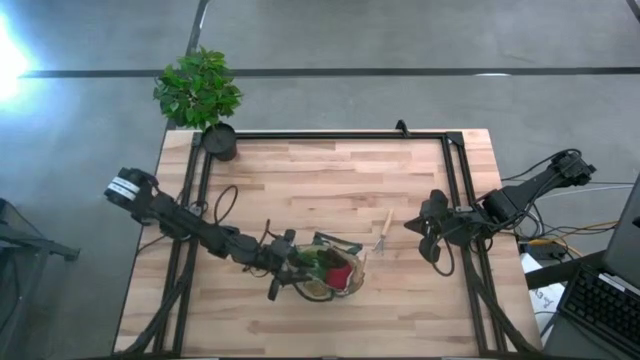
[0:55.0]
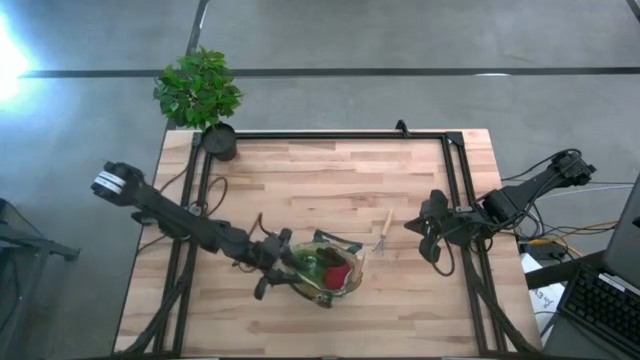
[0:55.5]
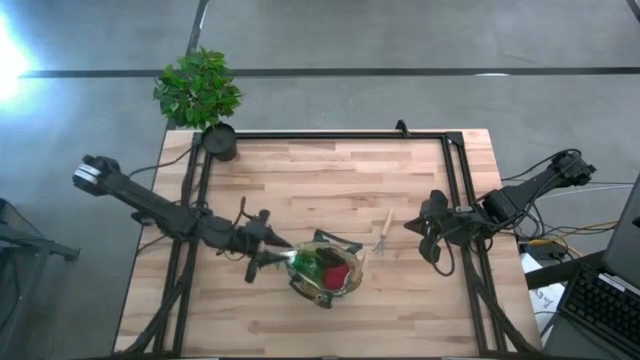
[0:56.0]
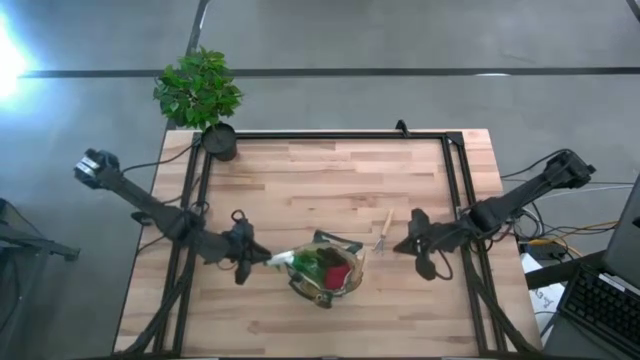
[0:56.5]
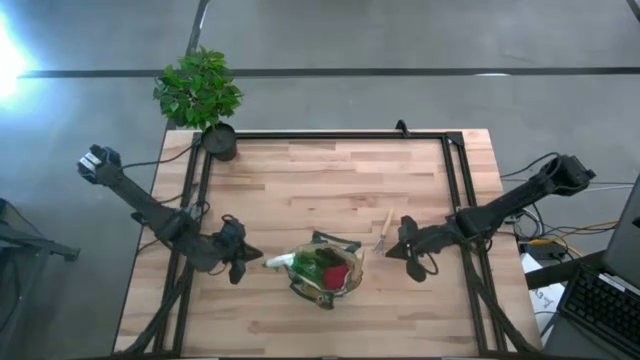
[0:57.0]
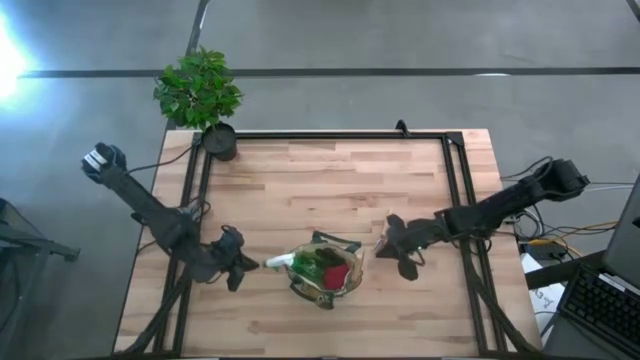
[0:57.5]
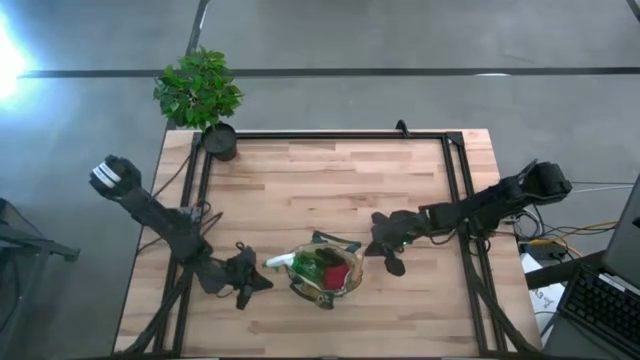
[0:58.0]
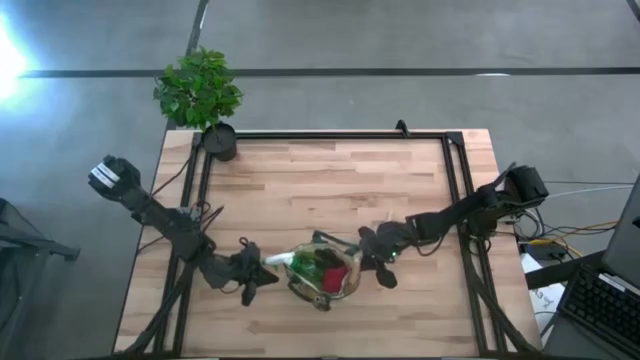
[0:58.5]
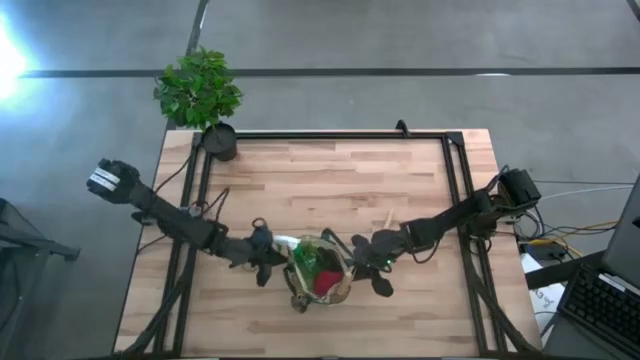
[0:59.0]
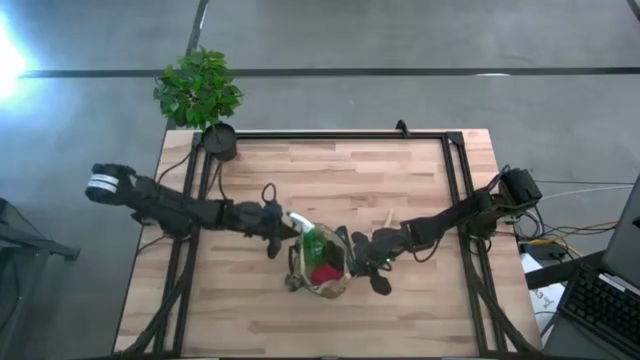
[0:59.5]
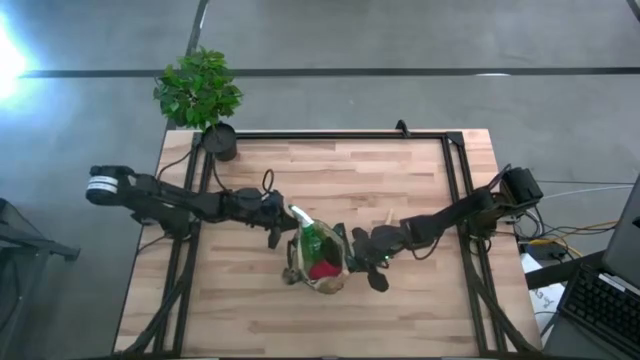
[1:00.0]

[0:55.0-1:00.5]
Task: Pick & Place Garden tools in Gardening bag
Adjust the gardening bag

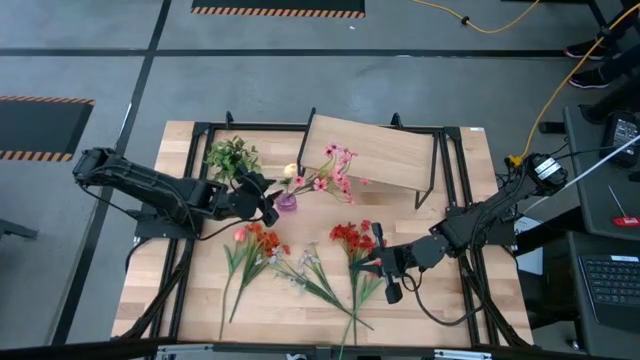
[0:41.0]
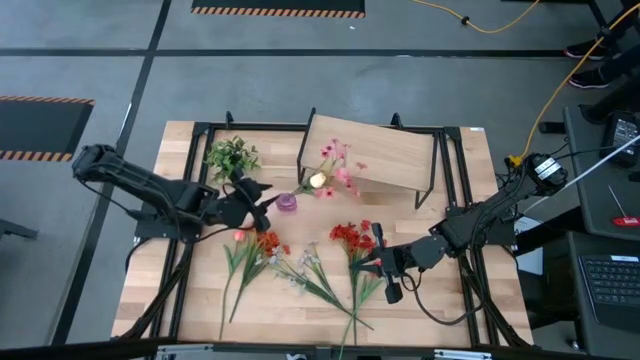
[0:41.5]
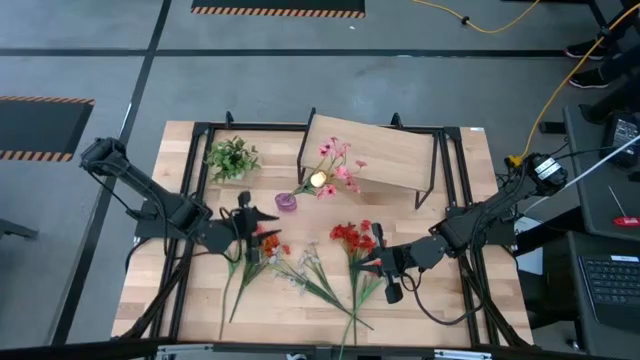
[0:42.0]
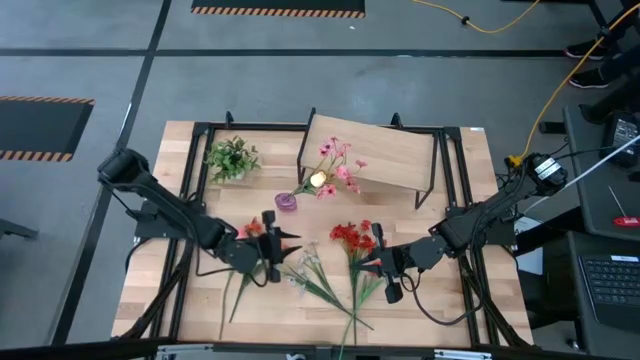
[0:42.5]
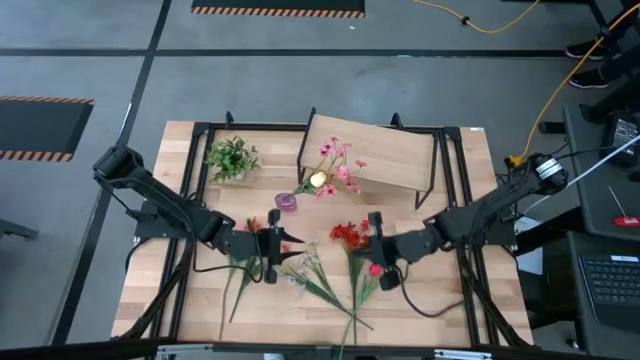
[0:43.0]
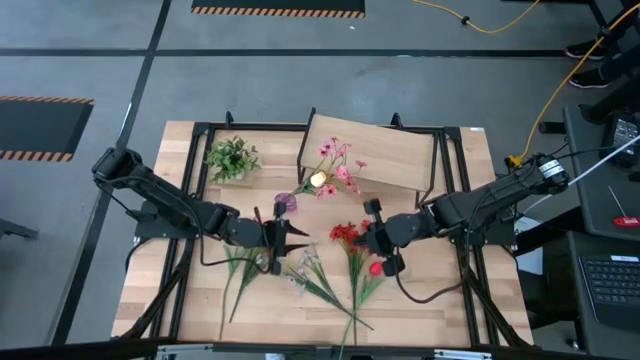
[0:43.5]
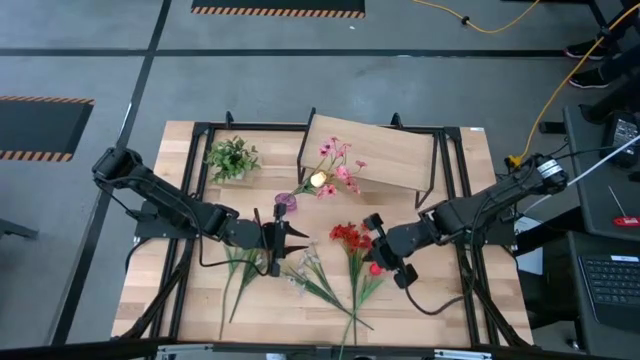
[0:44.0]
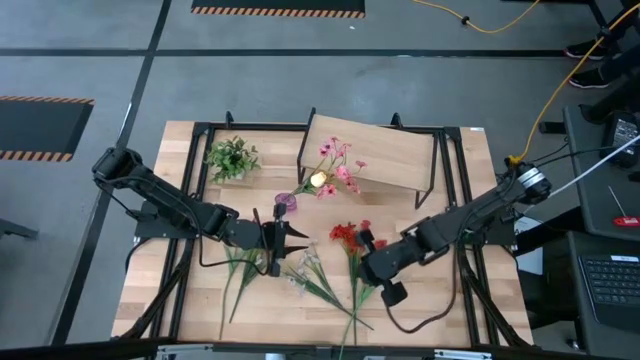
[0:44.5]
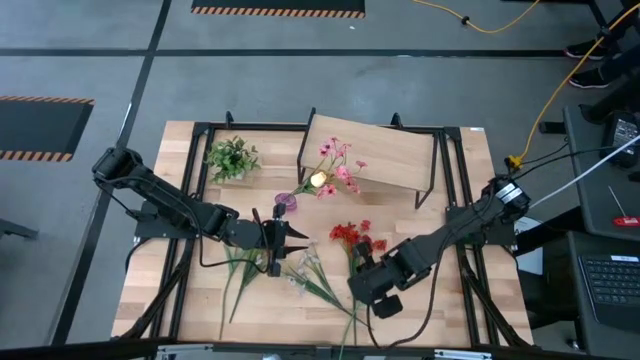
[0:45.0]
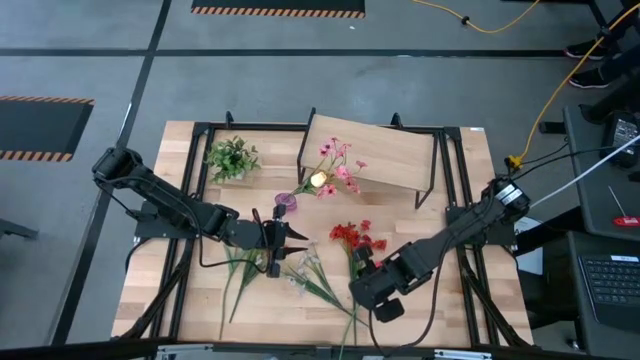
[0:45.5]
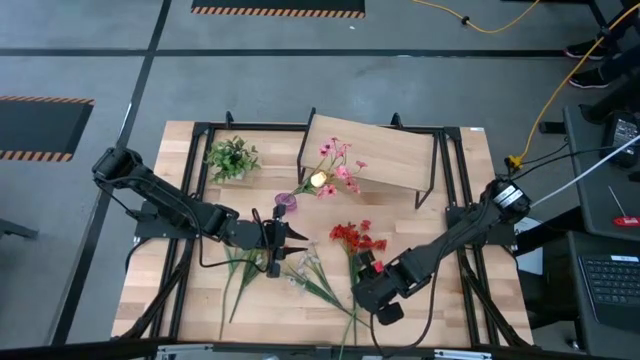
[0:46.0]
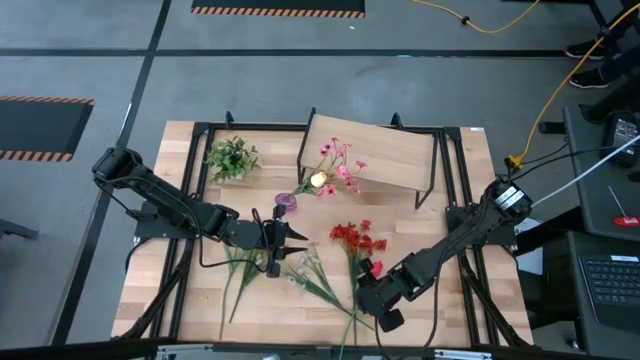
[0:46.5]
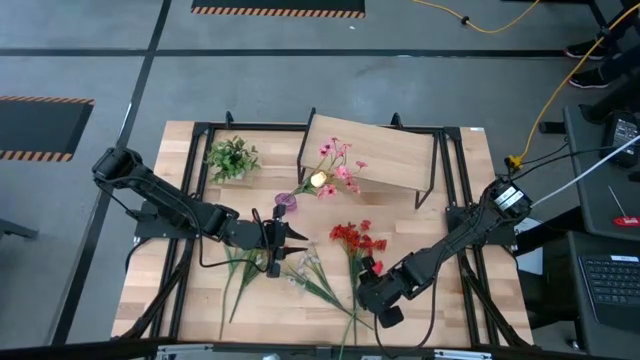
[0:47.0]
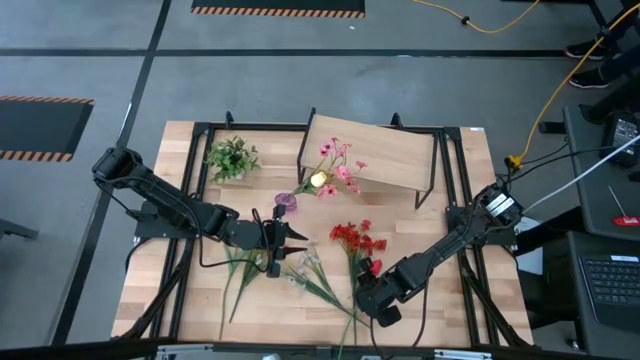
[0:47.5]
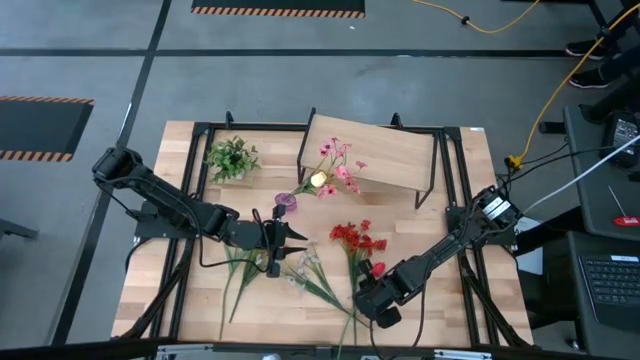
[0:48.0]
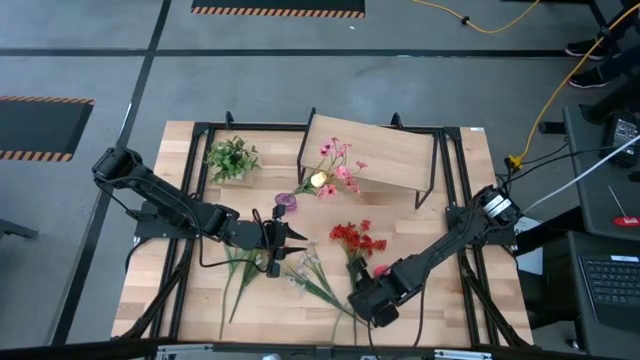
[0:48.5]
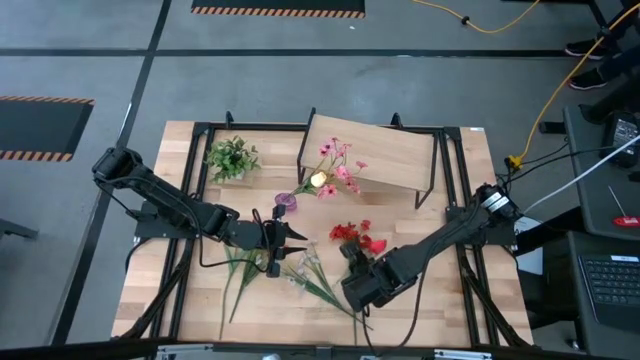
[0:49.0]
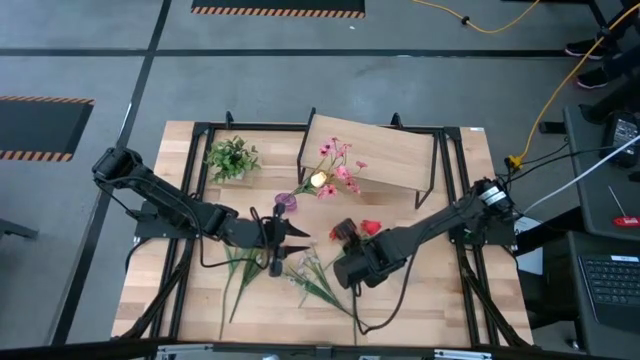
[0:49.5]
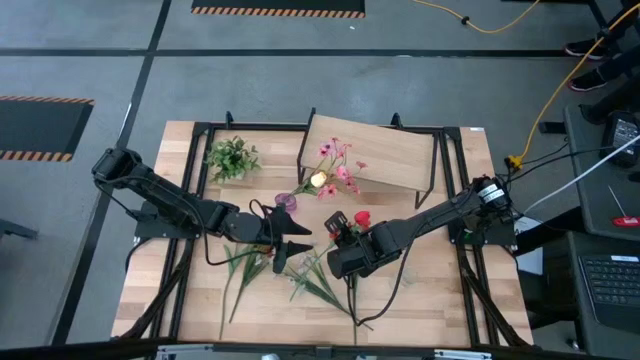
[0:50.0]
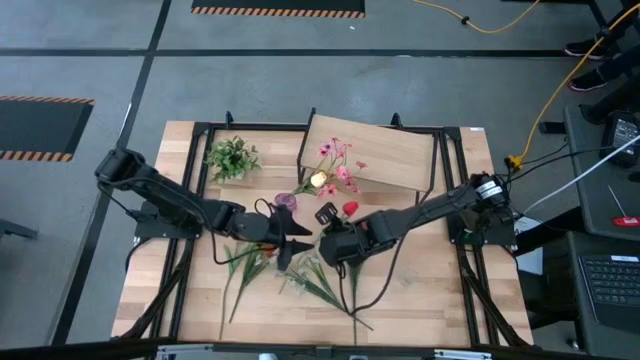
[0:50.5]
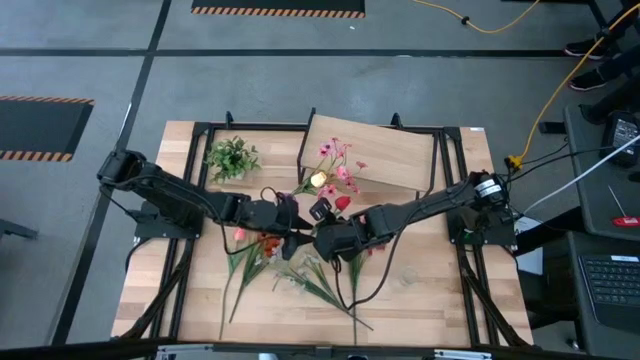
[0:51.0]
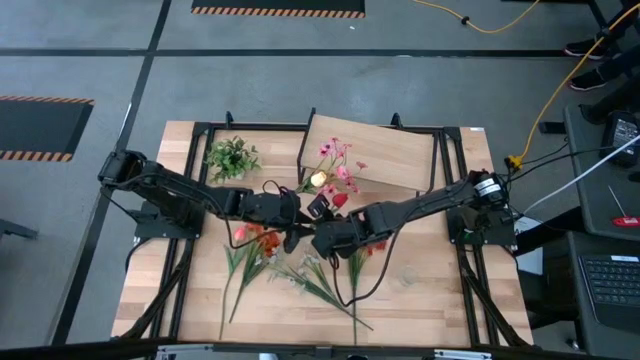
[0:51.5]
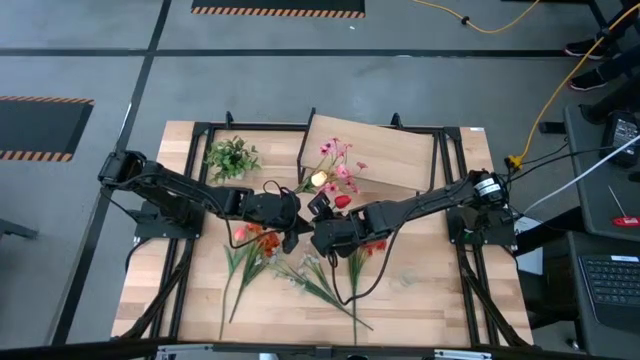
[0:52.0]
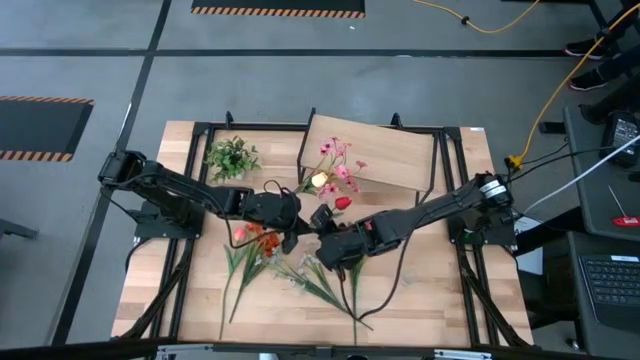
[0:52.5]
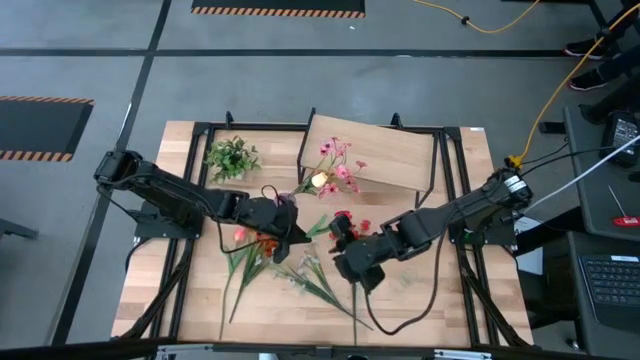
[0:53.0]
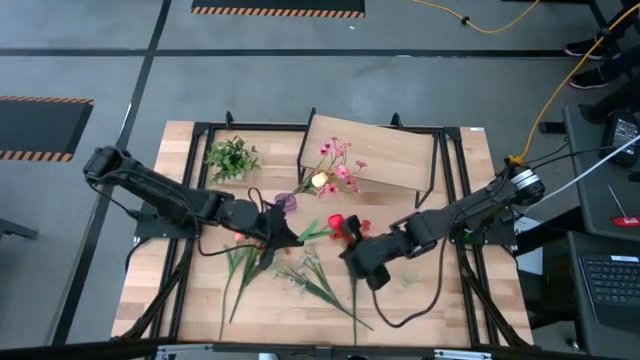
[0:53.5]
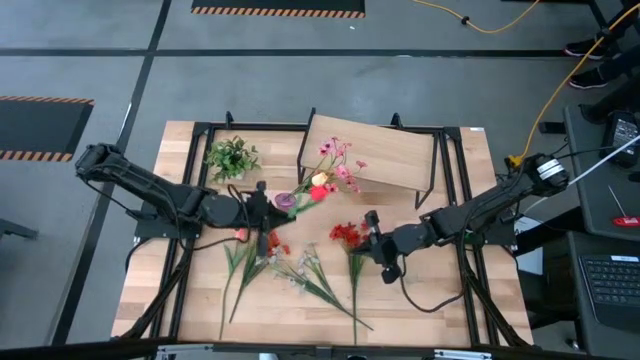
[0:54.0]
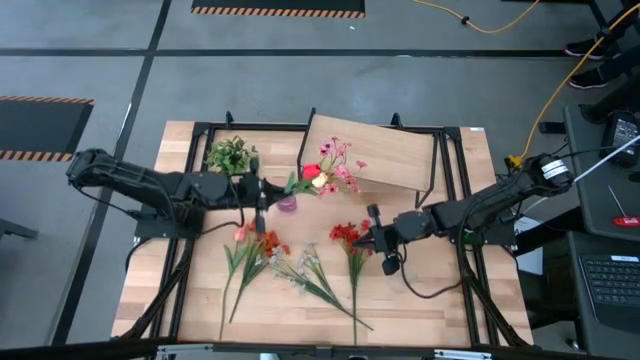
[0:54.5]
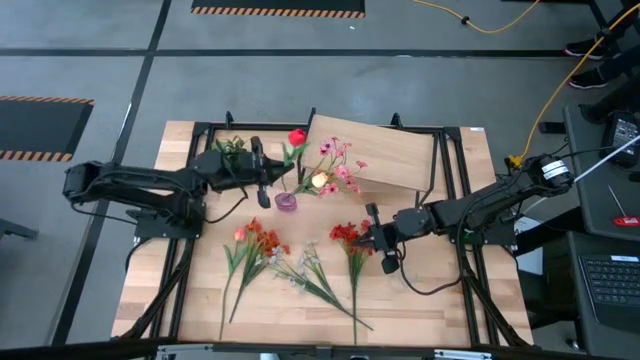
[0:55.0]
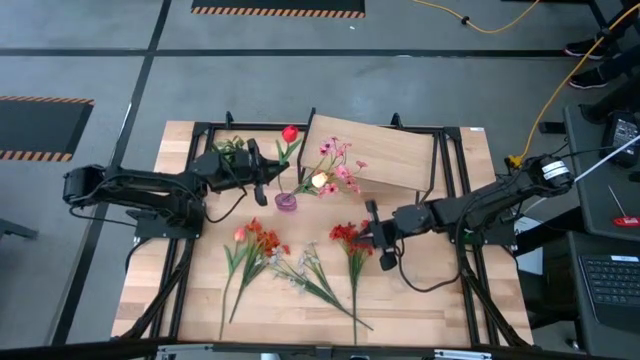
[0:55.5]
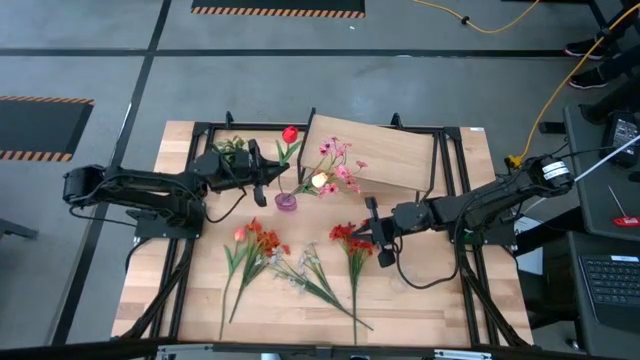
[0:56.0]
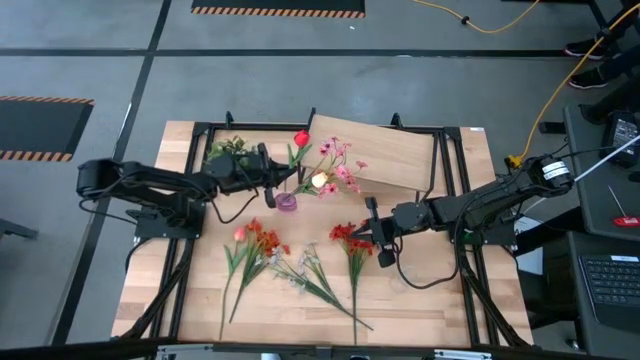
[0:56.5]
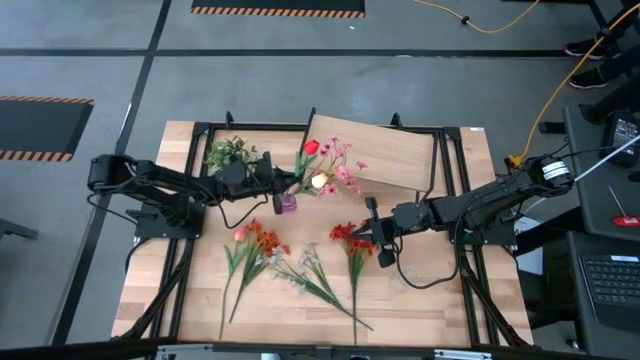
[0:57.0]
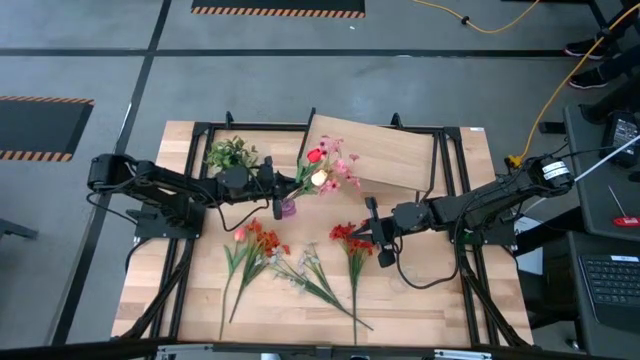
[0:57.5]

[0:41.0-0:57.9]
Task: Pick and place flowers into a vace then onto a shelf
Put the red flower into the purple vase
